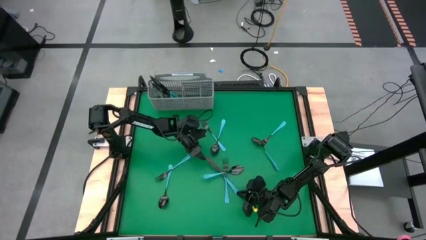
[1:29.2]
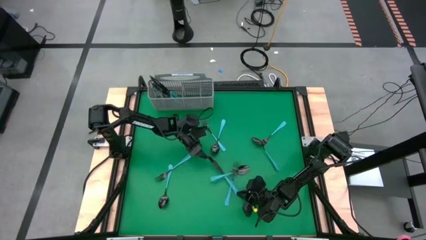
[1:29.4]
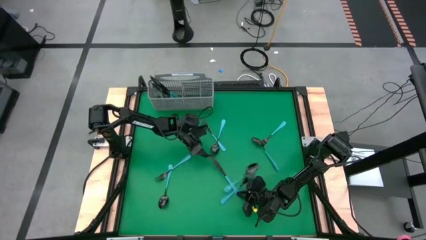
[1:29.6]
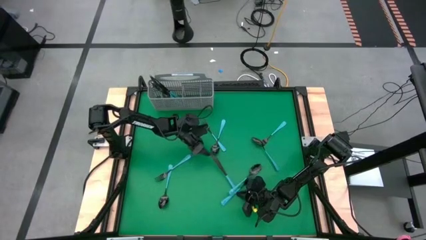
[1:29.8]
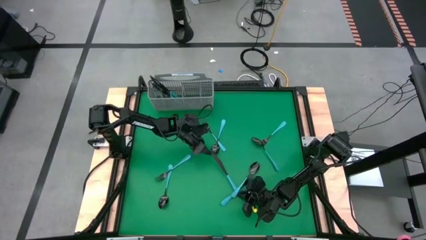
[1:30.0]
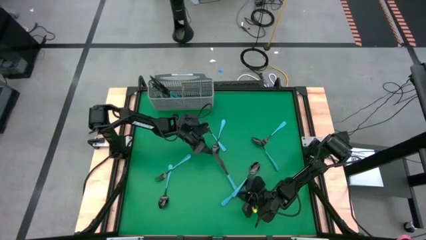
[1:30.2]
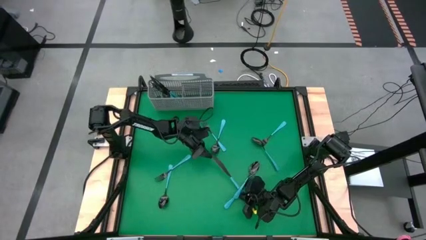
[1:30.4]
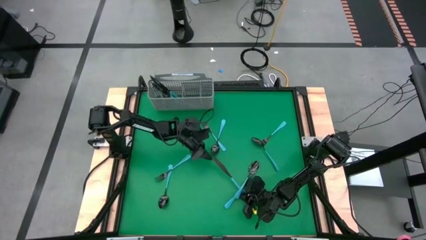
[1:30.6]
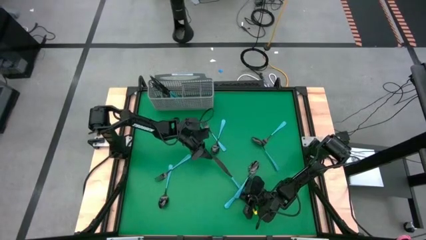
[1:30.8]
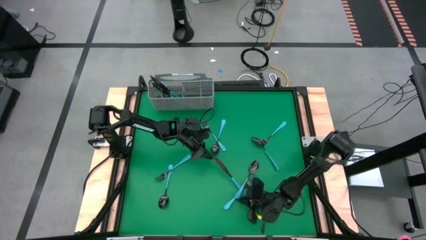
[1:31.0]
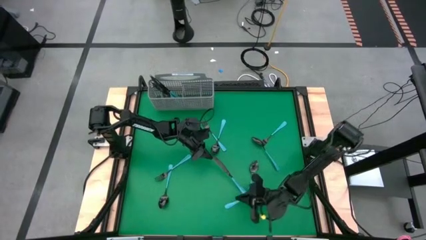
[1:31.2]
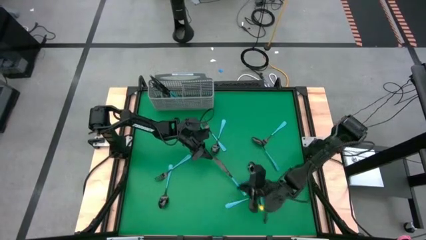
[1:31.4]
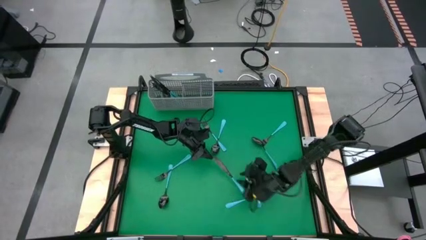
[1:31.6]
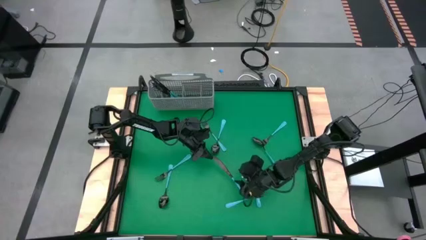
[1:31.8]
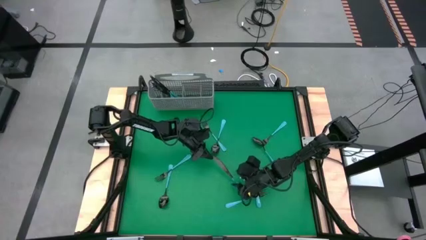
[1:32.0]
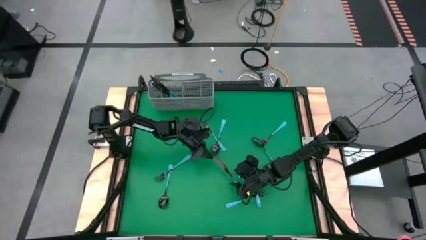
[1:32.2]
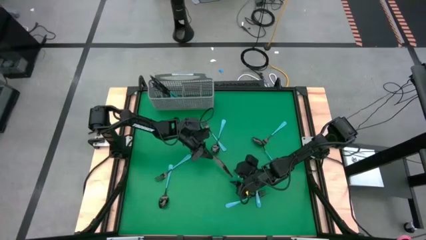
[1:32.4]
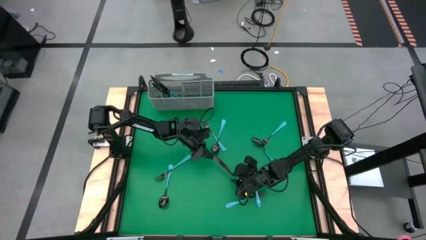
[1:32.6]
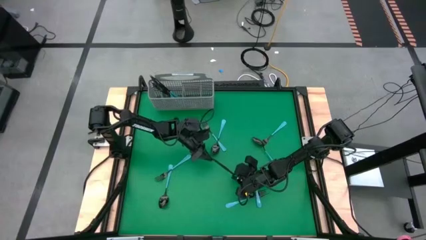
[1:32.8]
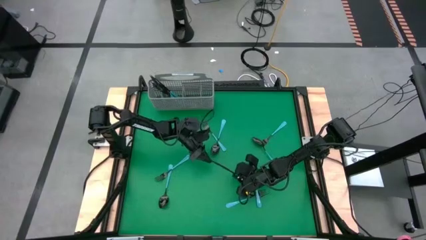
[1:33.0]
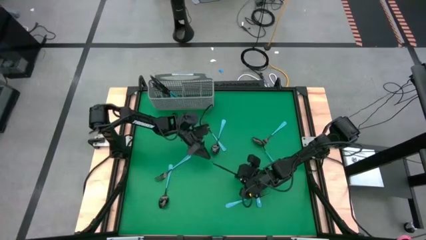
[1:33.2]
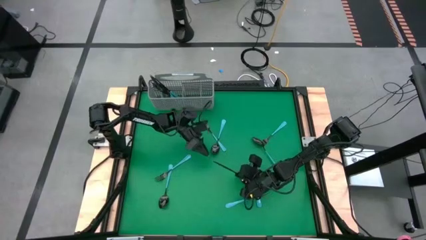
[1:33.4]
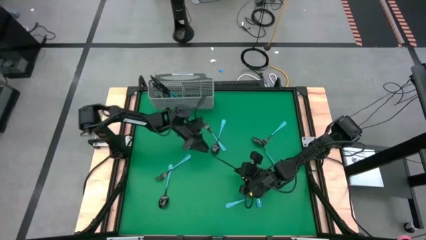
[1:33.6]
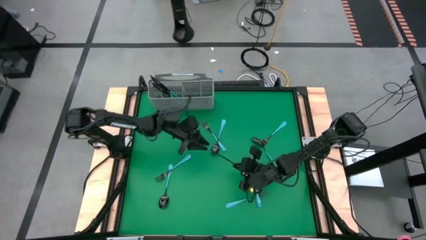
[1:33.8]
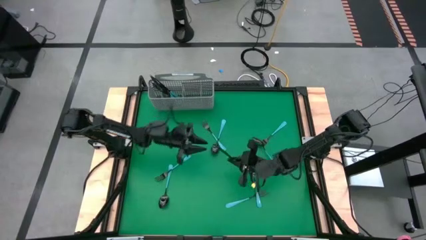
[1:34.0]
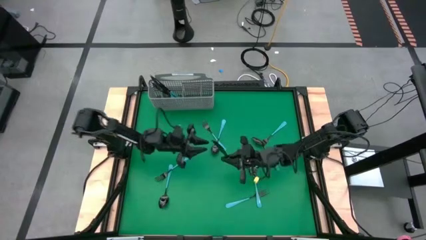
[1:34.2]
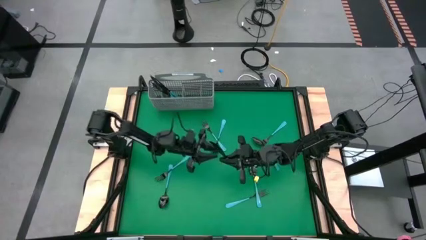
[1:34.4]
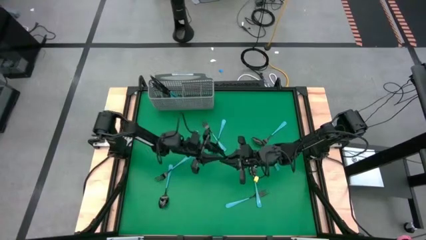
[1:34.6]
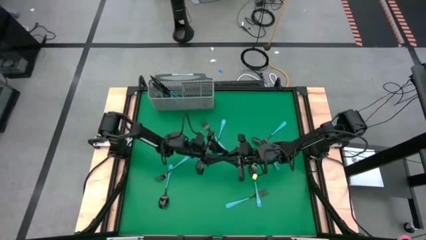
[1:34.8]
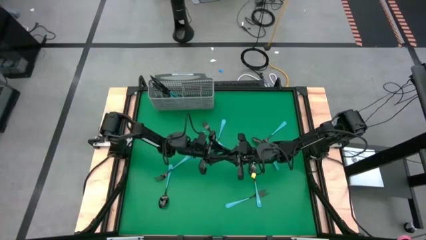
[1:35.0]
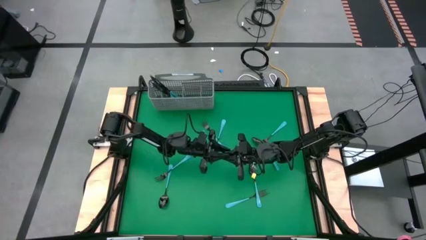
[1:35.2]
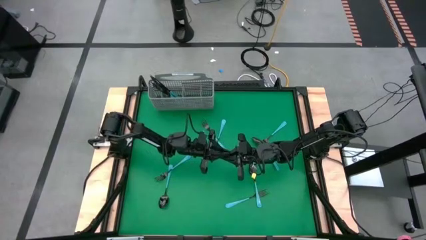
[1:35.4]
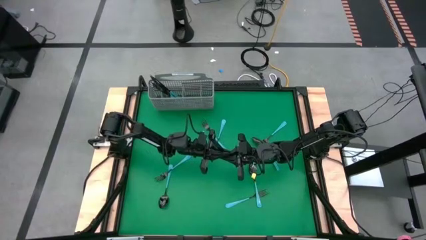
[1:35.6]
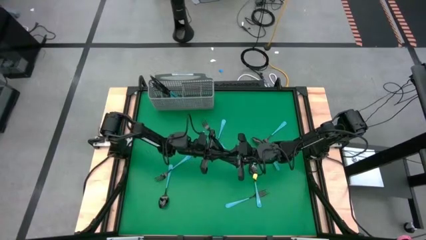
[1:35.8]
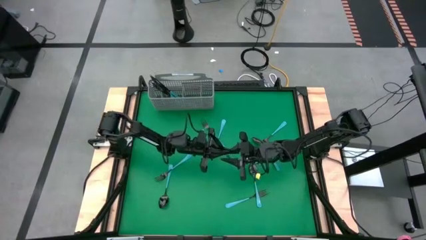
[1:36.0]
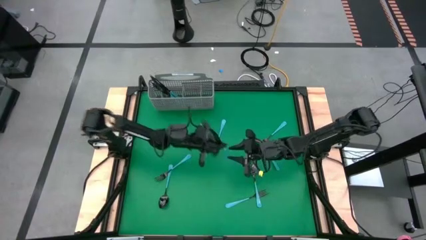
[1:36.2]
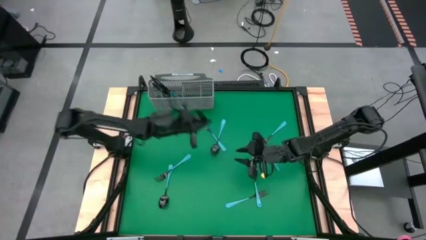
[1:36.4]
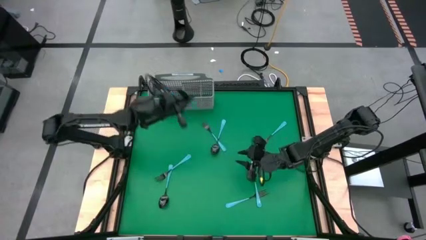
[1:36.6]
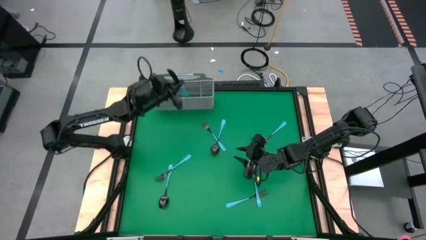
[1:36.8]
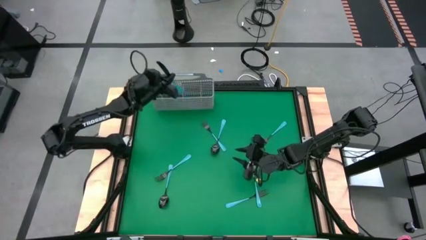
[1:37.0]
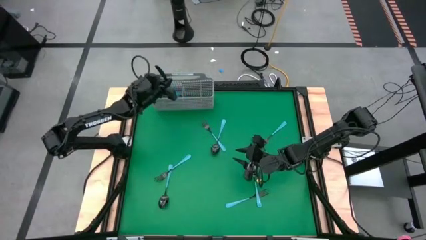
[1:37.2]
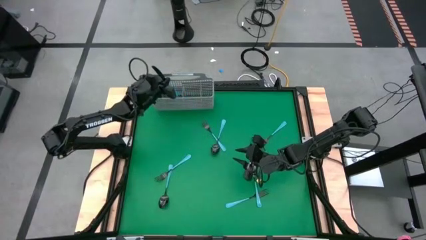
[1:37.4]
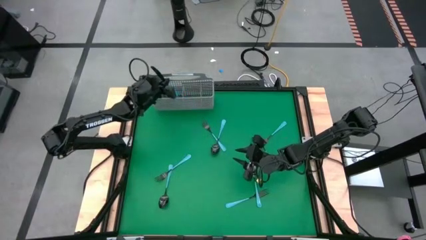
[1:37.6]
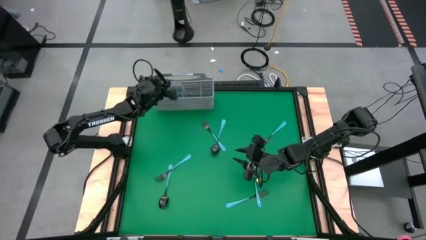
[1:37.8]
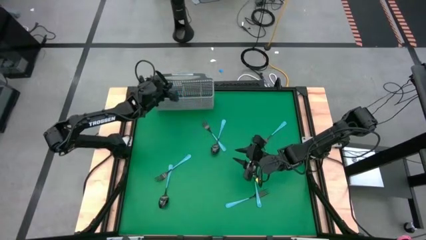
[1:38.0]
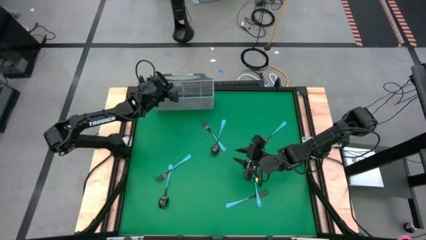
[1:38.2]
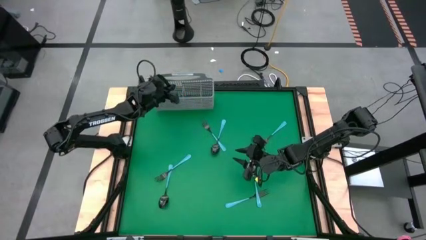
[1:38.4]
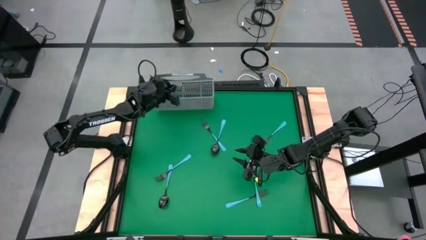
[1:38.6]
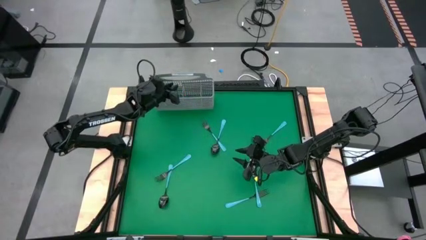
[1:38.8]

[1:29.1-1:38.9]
Task: Sort silverware
Put the table knife into the silverware rack

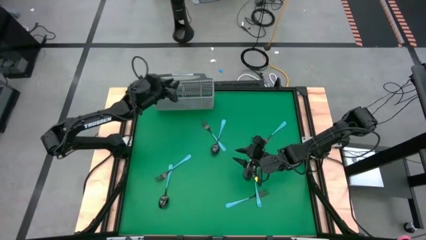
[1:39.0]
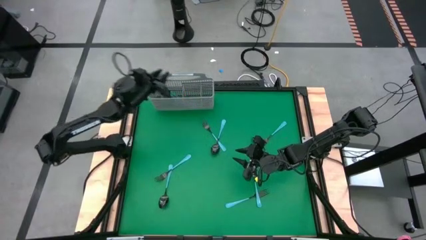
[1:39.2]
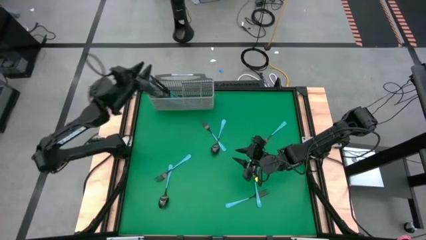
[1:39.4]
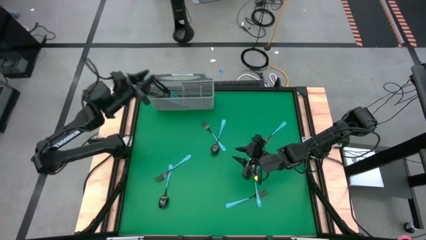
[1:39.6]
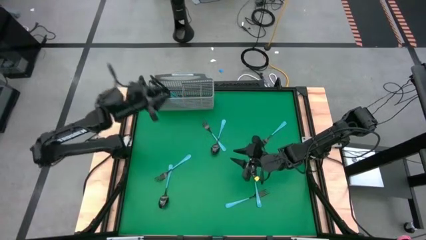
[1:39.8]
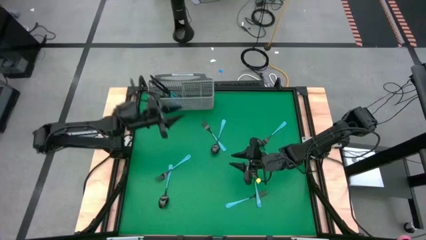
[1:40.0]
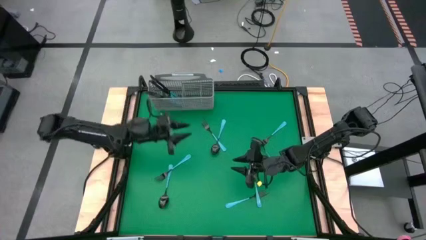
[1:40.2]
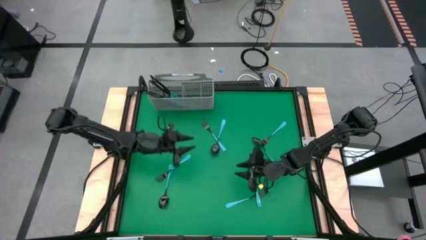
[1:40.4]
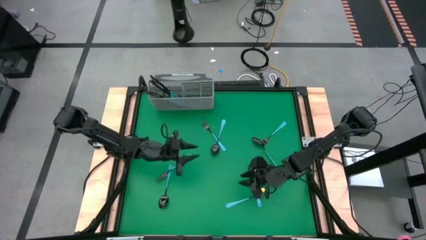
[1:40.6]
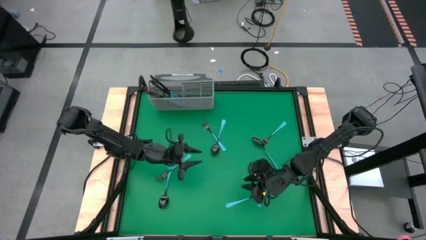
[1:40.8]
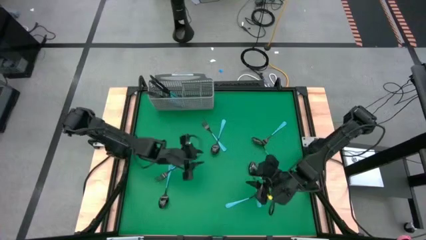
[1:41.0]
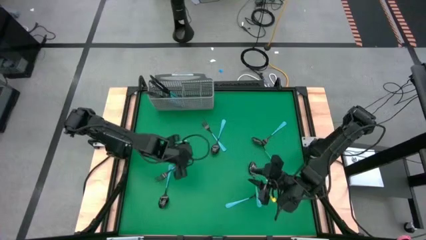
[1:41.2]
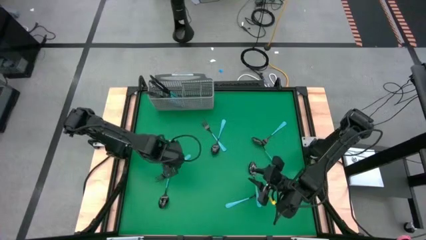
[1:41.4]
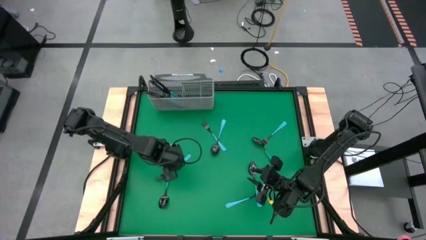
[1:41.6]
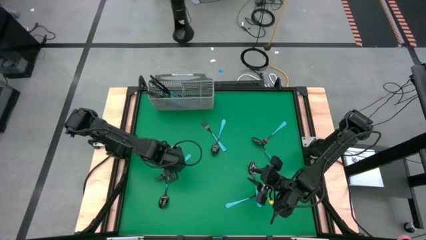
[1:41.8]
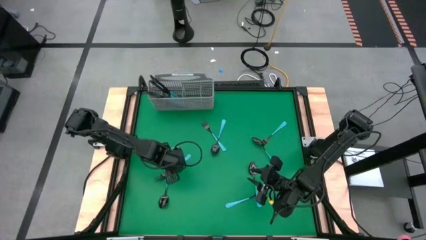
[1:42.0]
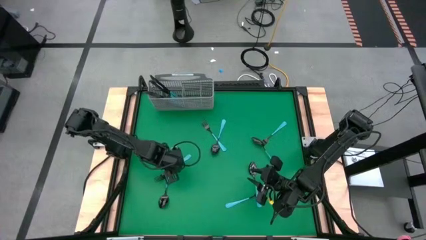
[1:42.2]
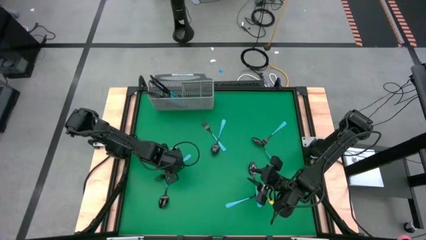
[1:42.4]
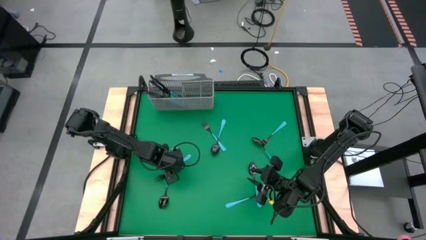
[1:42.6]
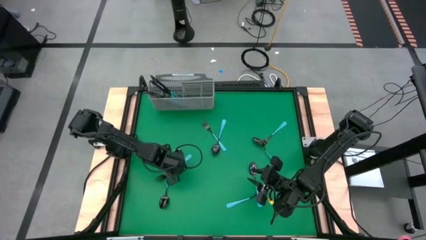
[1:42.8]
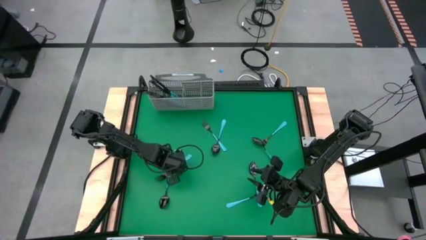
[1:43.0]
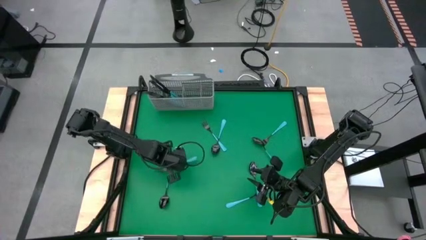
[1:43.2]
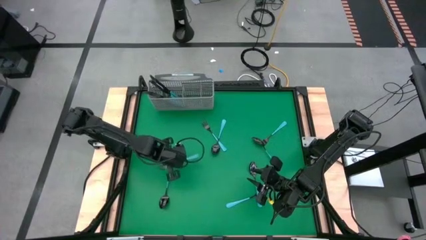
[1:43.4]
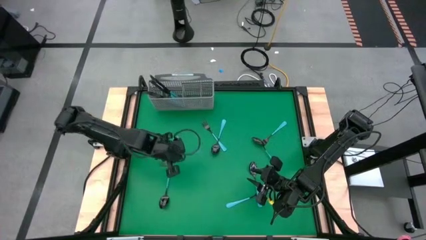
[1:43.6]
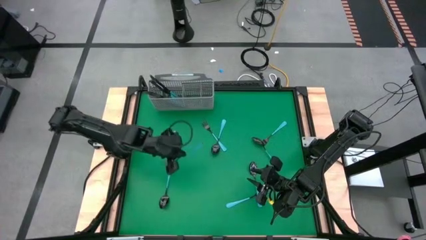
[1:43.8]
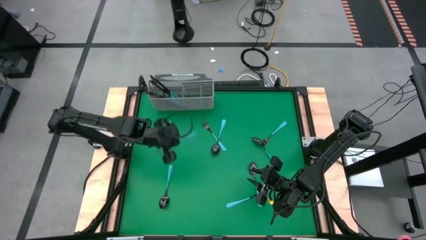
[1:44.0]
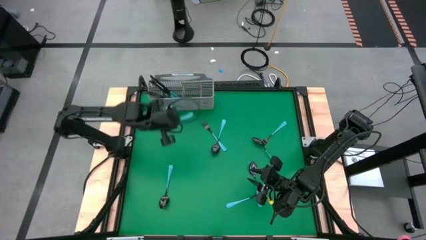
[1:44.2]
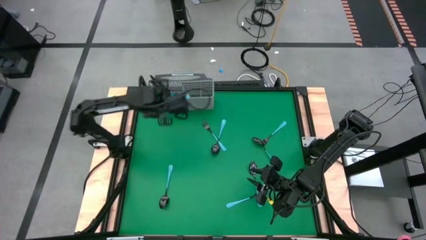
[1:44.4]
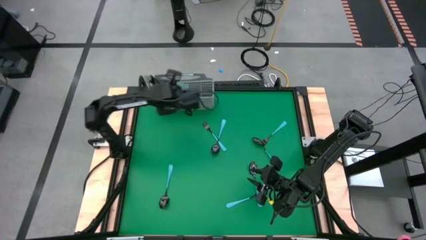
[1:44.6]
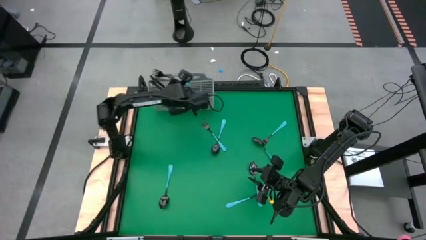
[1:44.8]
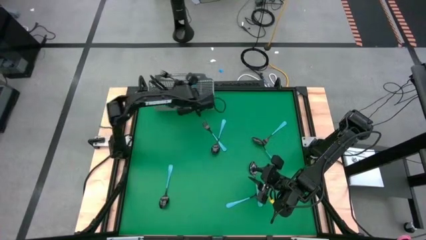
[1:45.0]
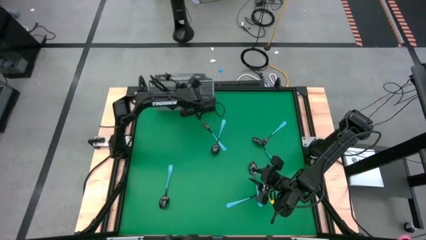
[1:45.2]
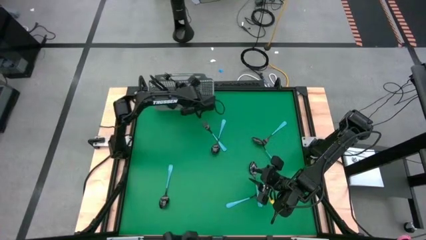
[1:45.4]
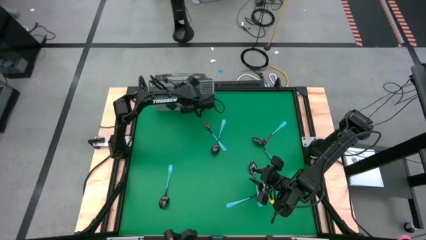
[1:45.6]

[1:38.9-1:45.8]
Put the fork into the silverware rack
